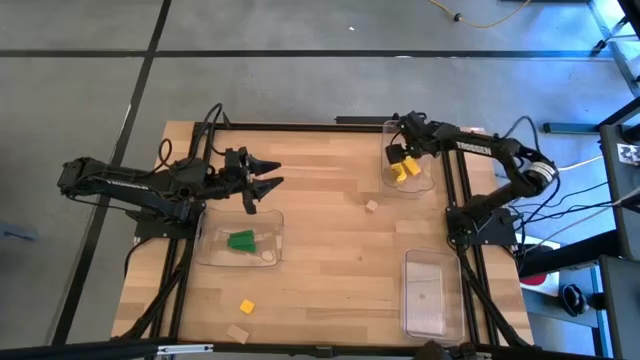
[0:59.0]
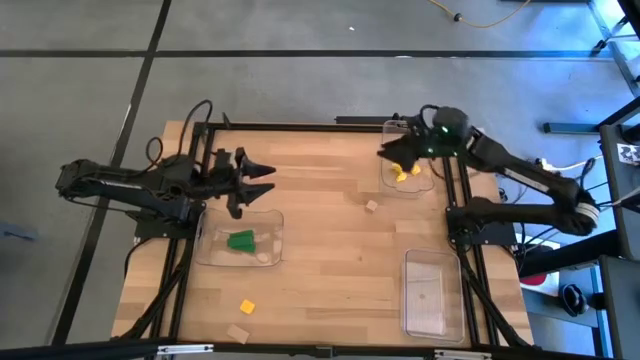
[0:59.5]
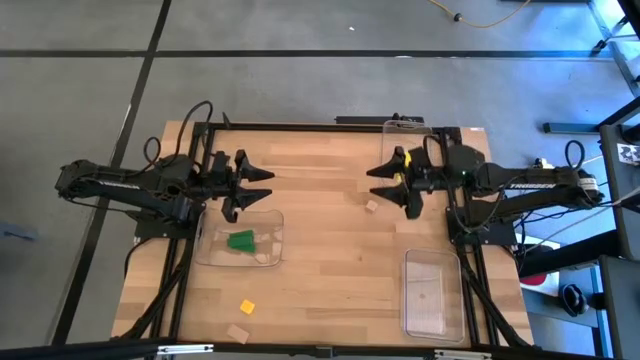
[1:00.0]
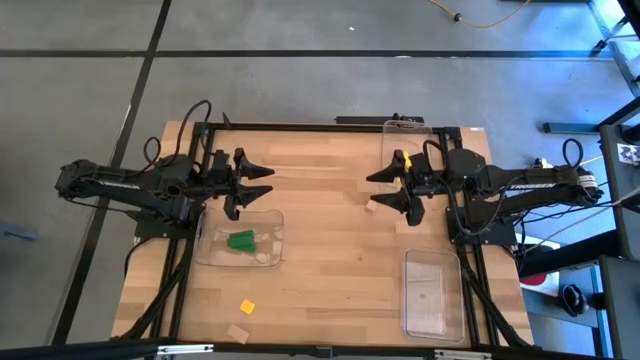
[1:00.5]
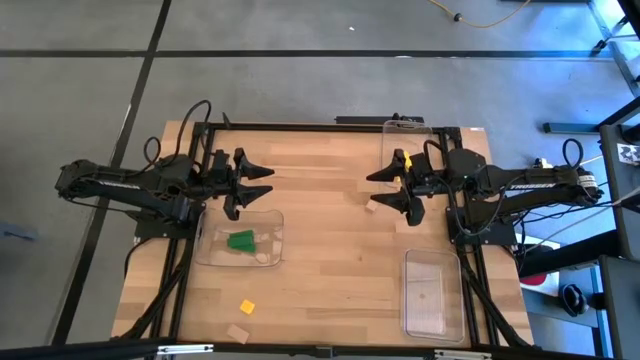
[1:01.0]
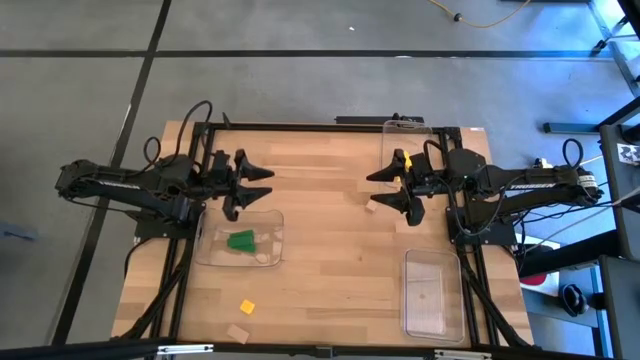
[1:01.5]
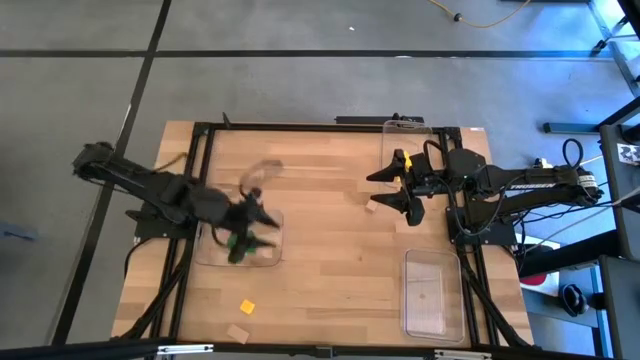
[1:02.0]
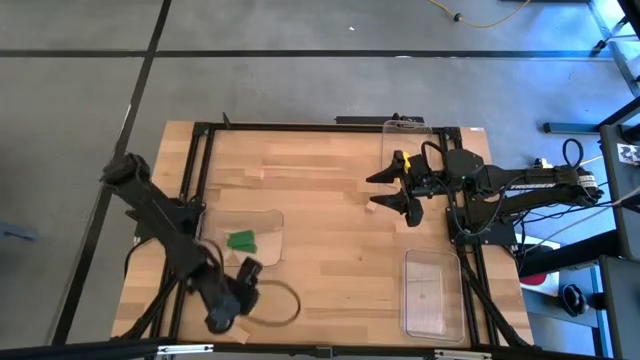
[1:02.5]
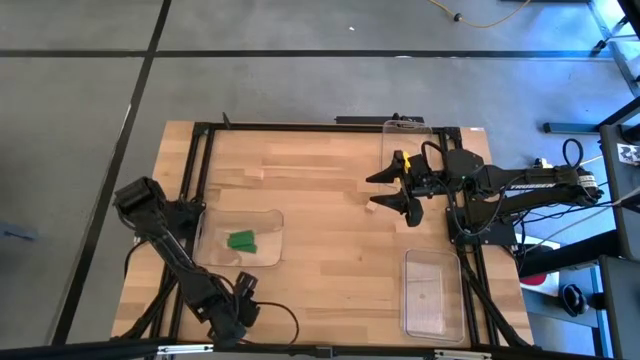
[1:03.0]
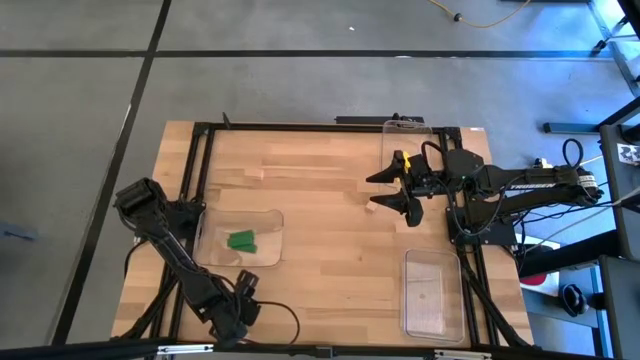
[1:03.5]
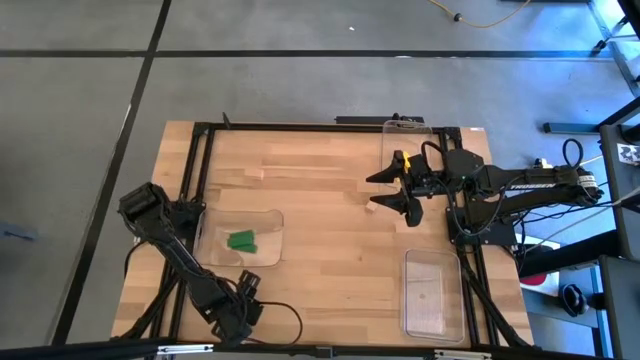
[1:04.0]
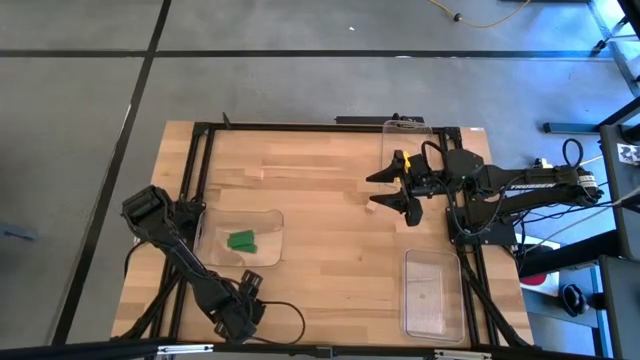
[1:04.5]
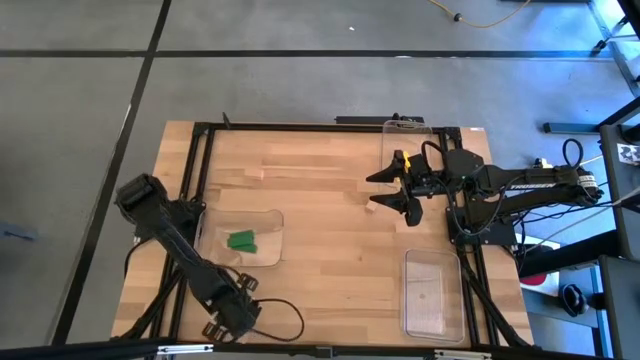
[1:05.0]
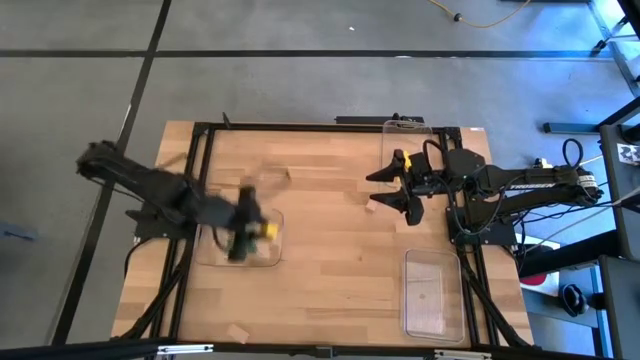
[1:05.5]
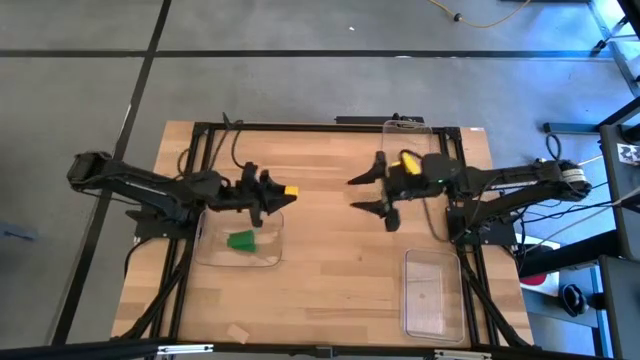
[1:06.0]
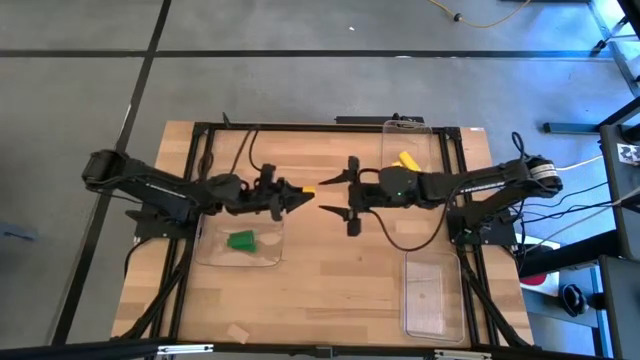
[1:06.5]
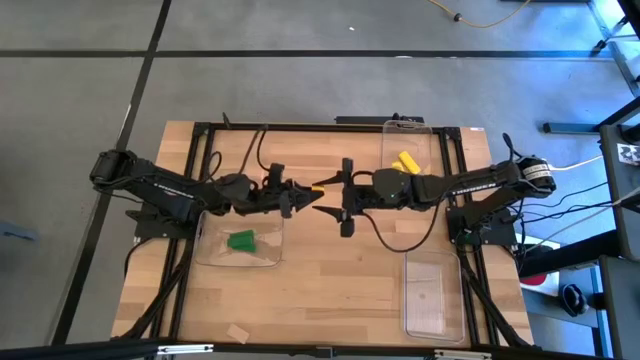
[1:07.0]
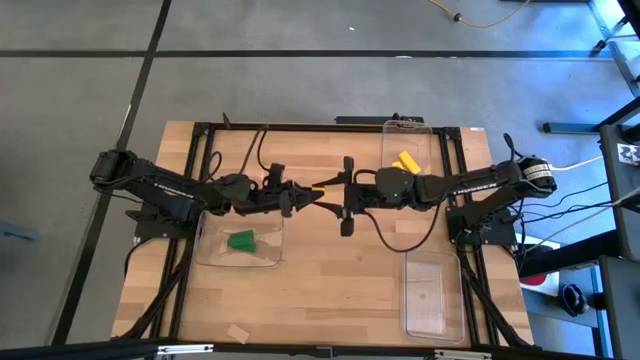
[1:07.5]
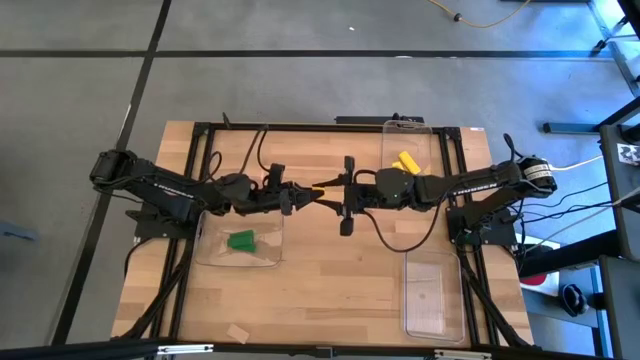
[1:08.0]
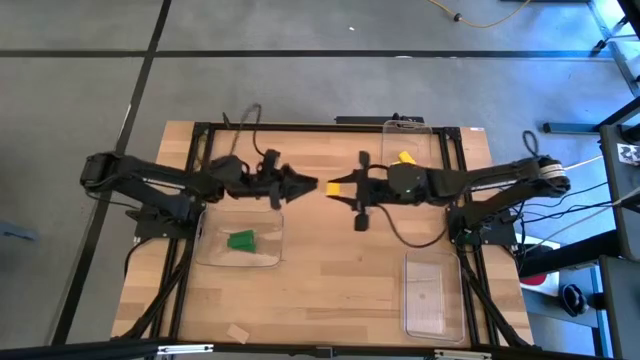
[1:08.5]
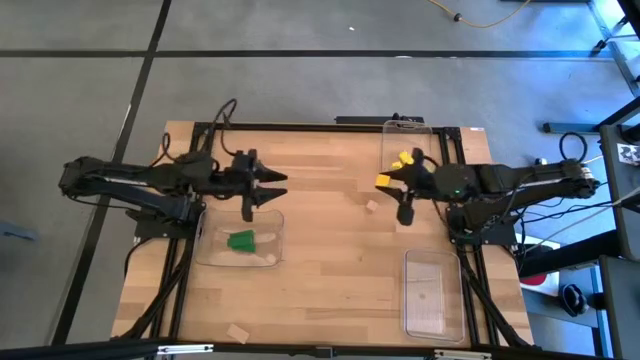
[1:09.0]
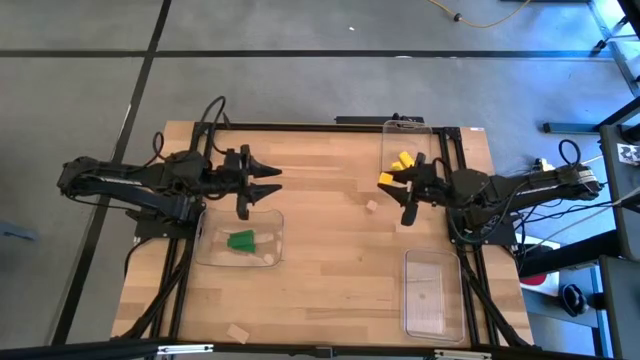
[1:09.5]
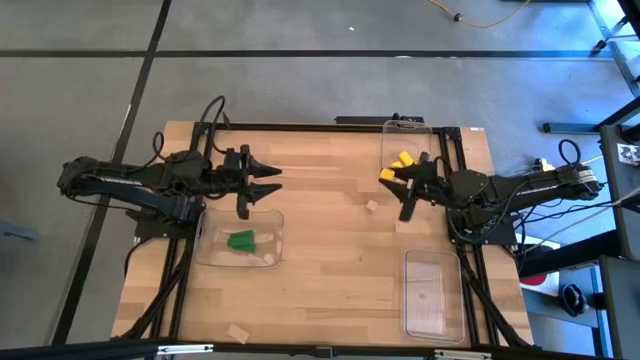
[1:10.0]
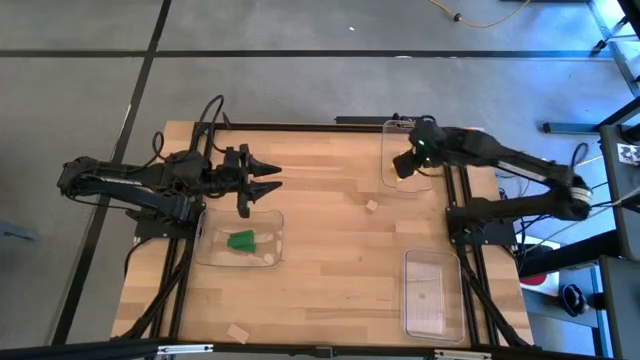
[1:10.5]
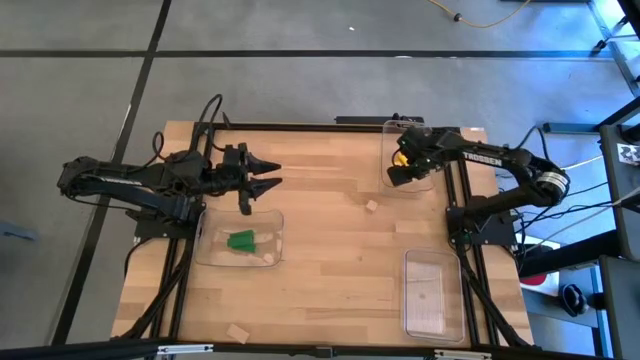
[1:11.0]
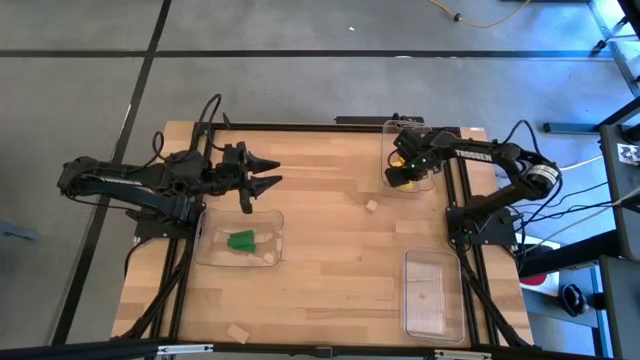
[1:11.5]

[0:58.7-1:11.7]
Task: Sort & place blocks by color
Put the yellow block into the top right transparent bin

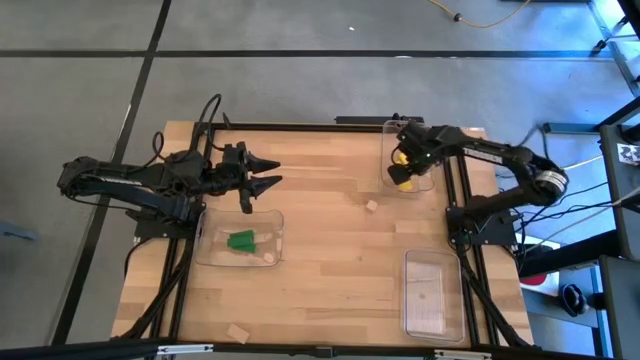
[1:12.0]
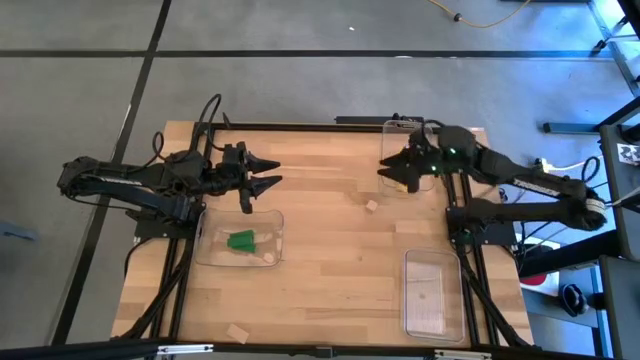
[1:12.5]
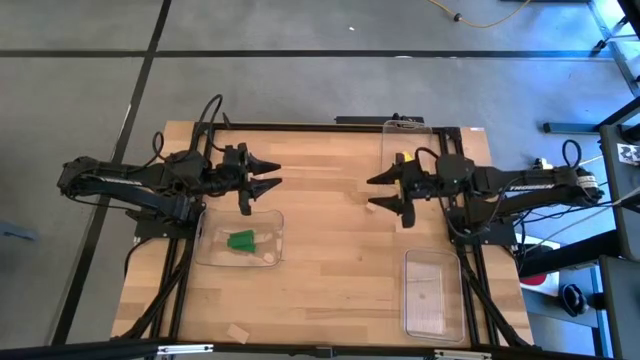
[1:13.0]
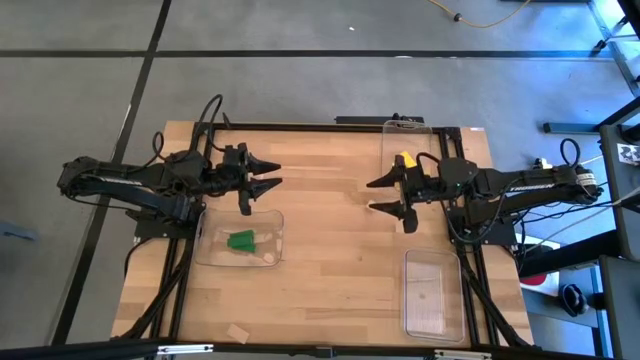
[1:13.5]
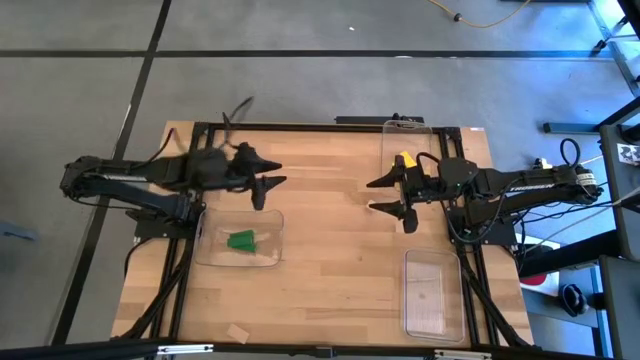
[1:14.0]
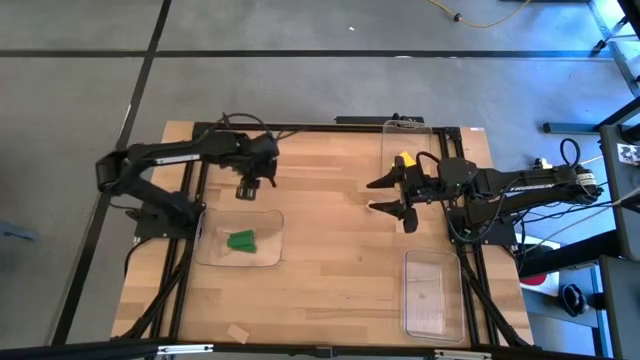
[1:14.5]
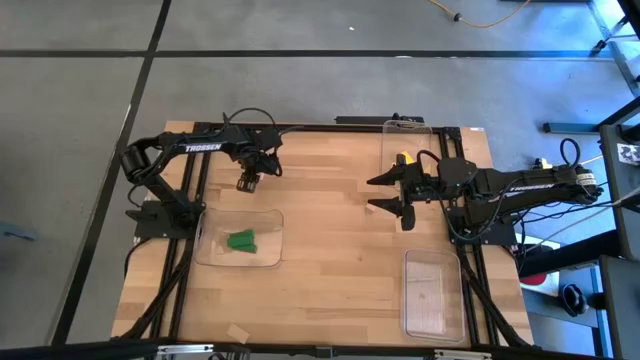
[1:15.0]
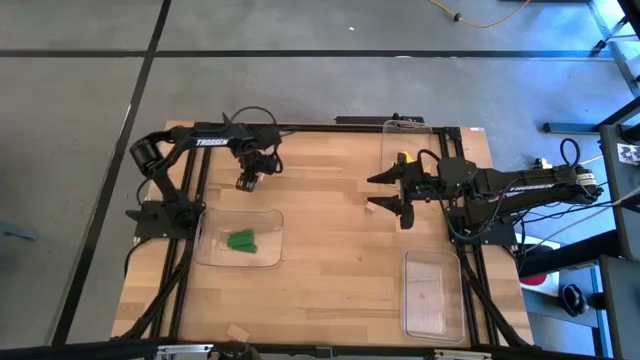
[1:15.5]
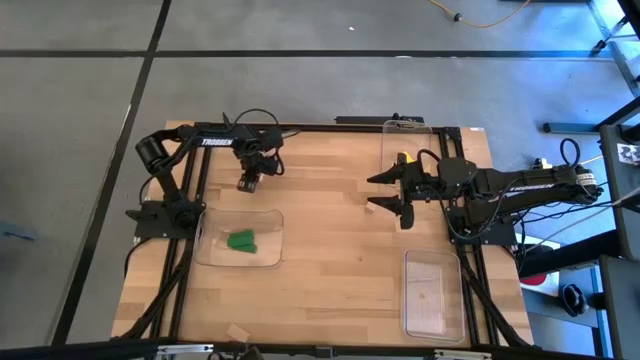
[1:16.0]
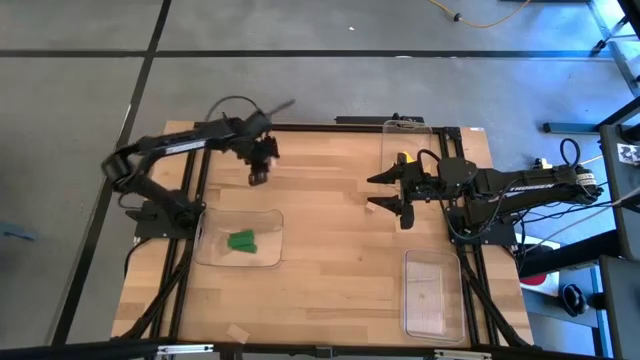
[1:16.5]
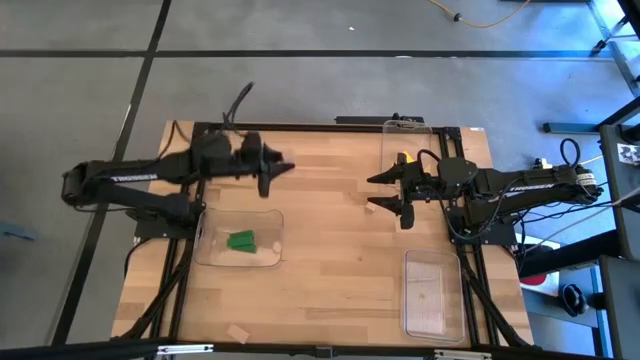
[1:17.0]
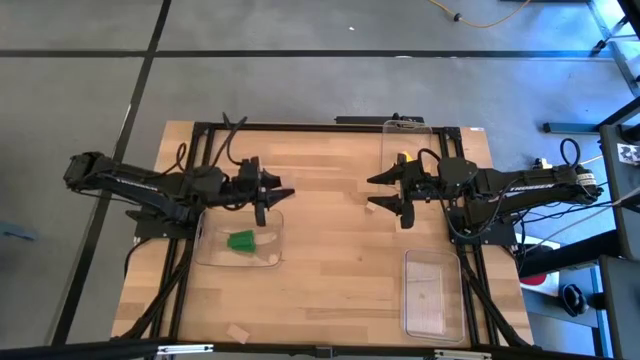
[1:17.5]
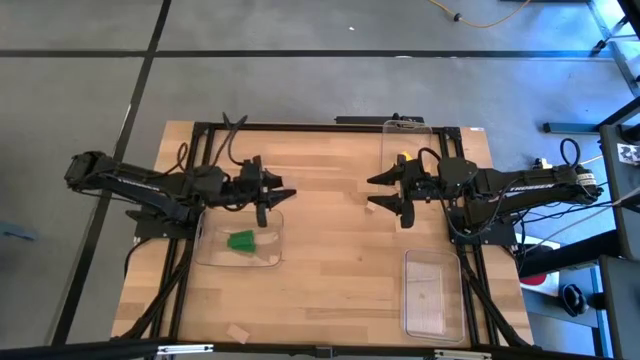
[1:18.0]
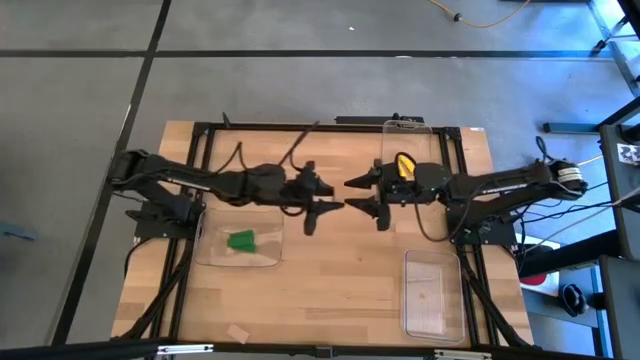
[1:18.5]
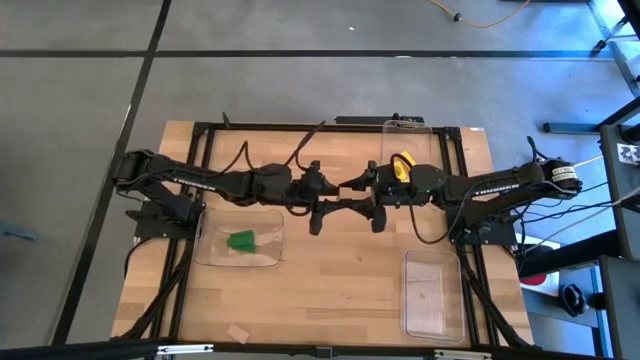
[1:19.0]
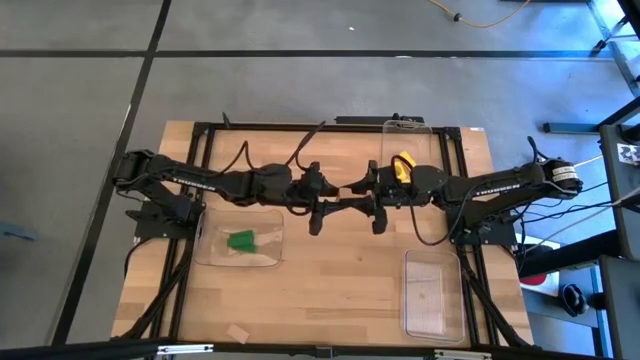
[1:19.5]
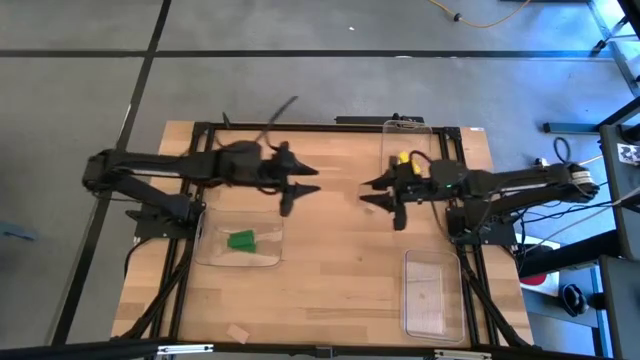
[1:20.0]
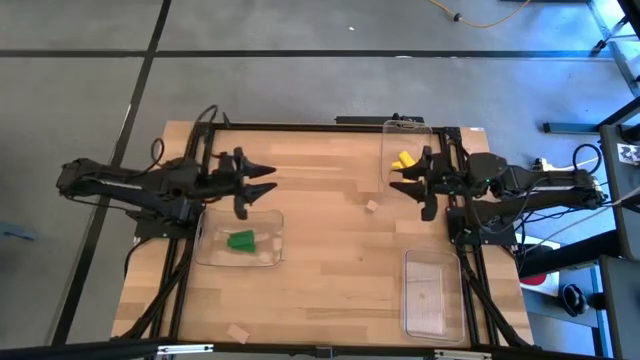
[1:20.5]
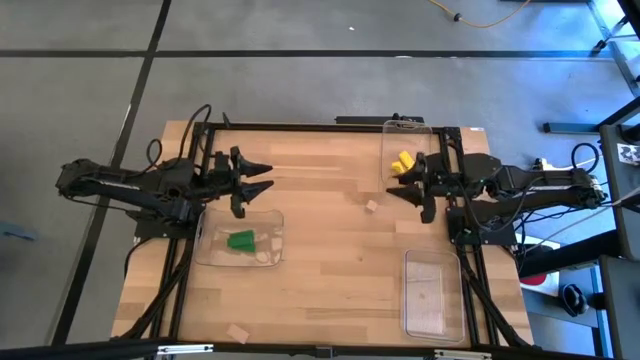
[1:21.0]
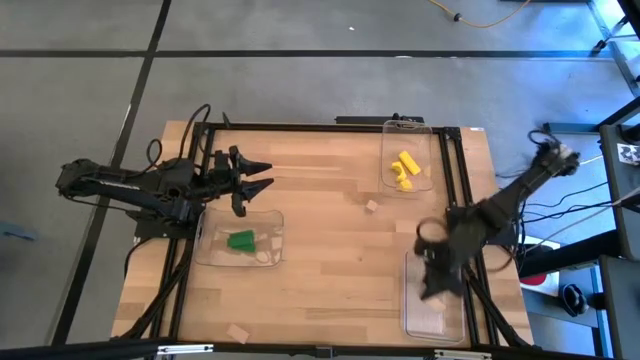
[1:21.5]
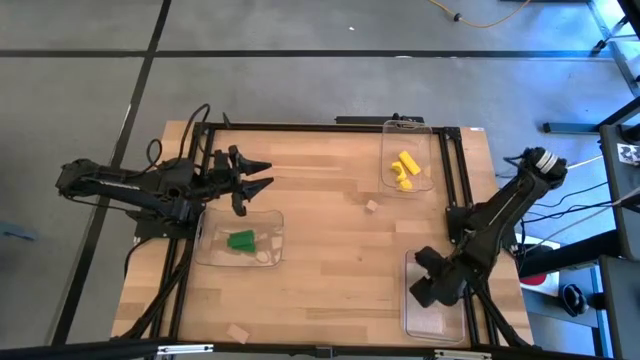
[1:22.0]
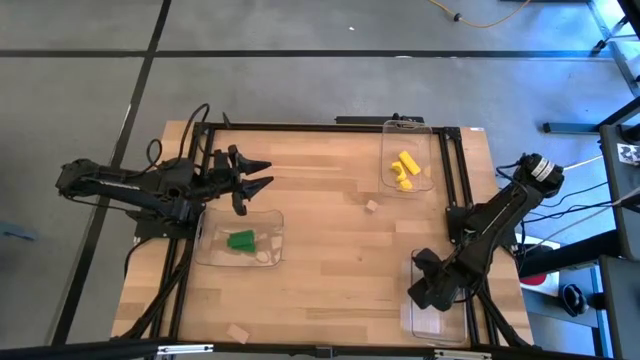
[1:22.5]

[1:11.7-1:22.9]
Put the top left brown block into the bottom right transparent bin
